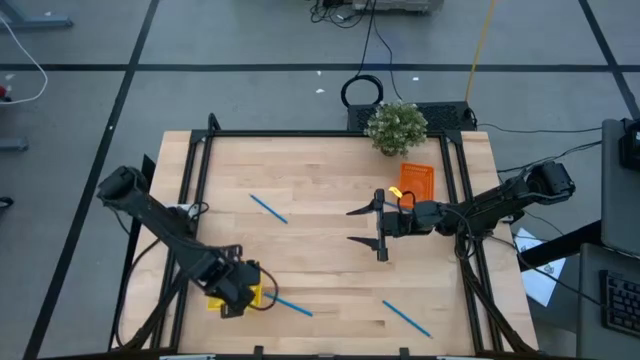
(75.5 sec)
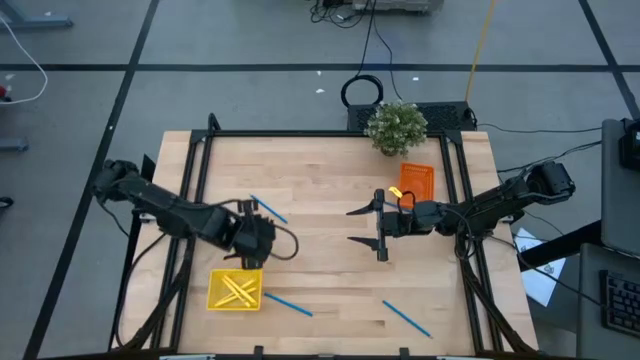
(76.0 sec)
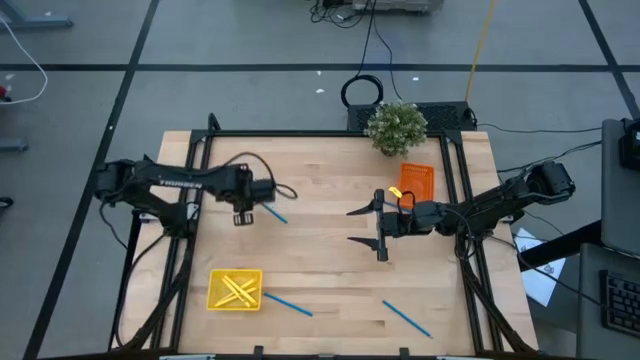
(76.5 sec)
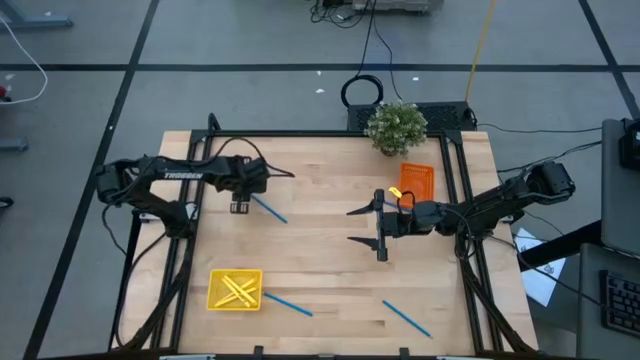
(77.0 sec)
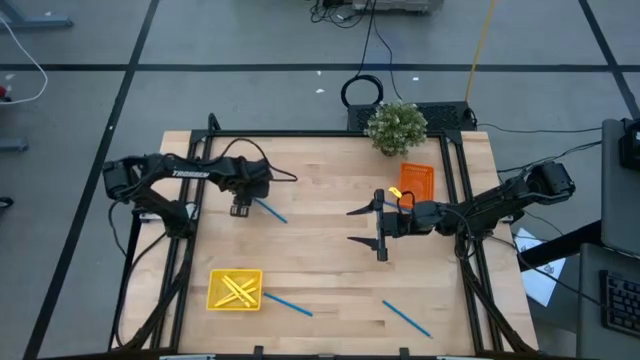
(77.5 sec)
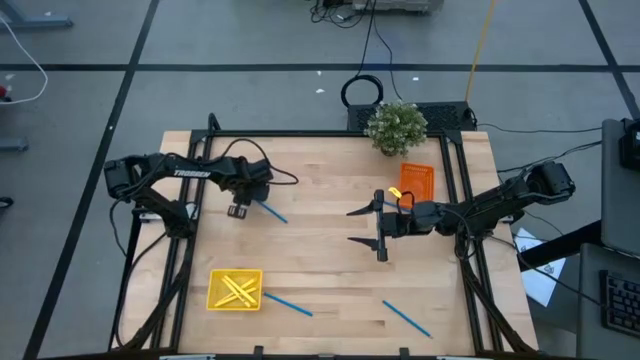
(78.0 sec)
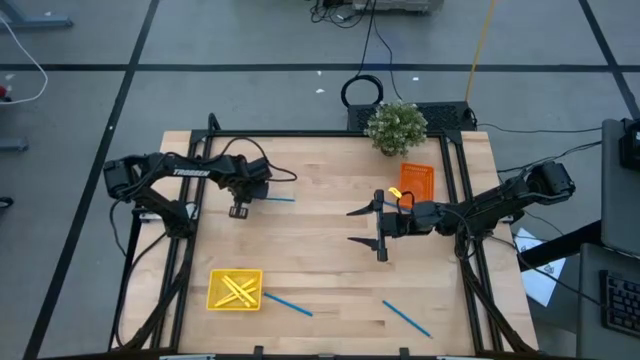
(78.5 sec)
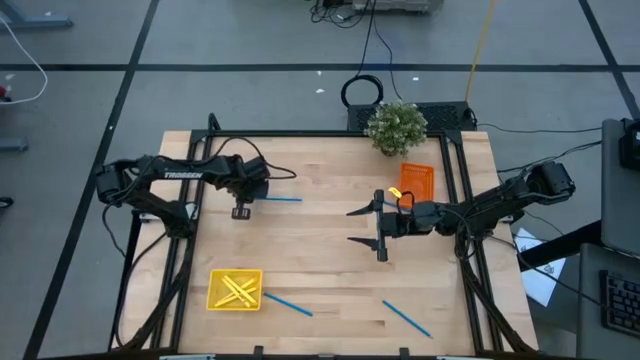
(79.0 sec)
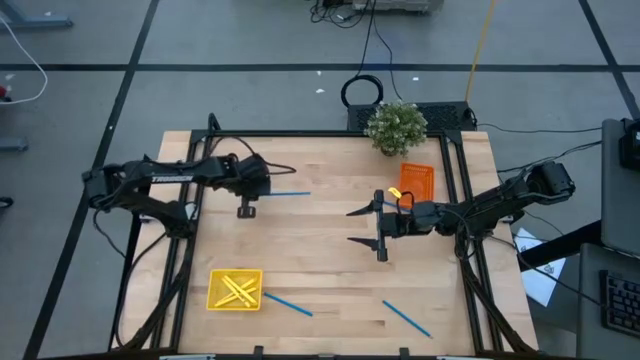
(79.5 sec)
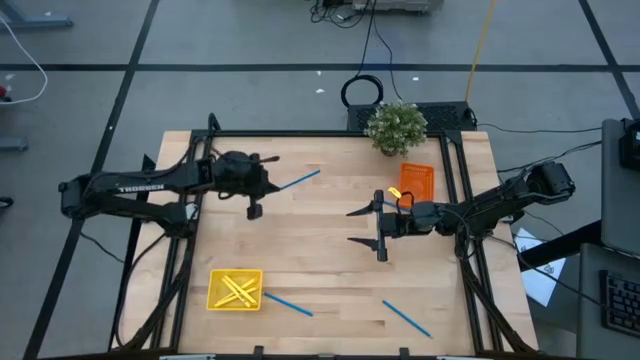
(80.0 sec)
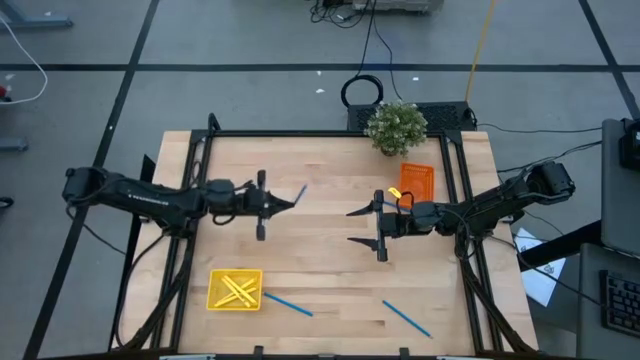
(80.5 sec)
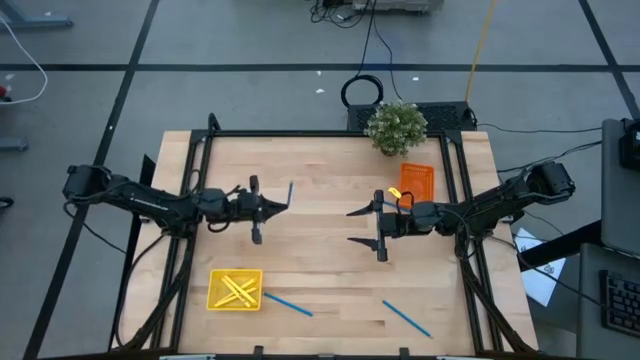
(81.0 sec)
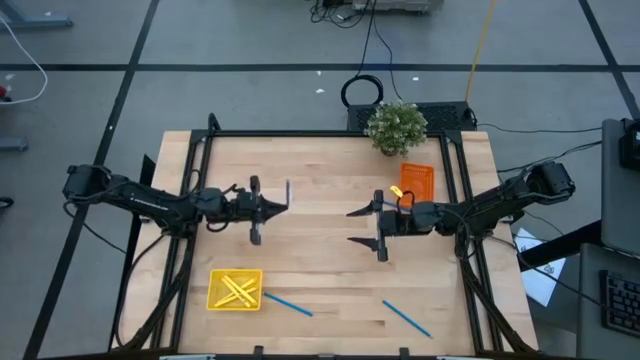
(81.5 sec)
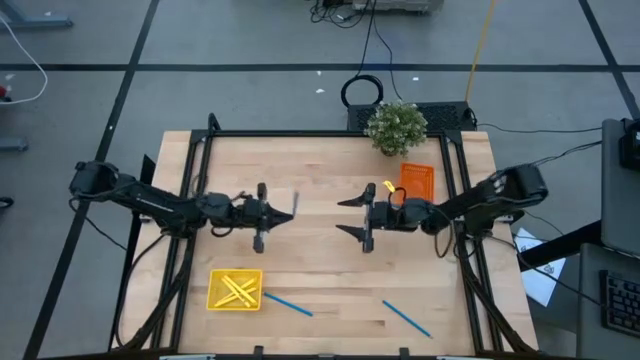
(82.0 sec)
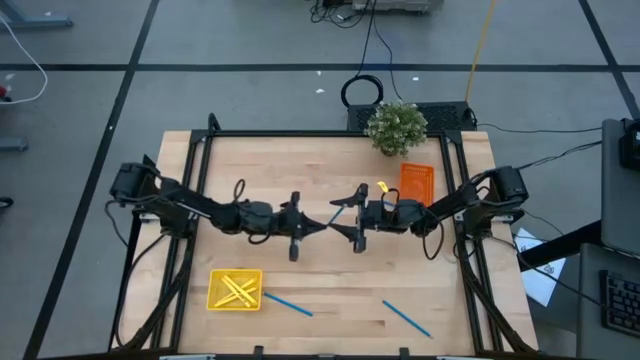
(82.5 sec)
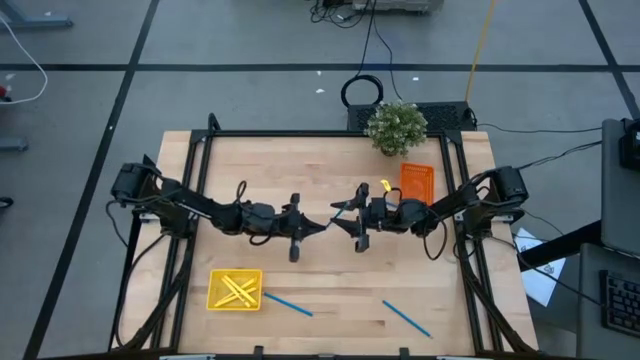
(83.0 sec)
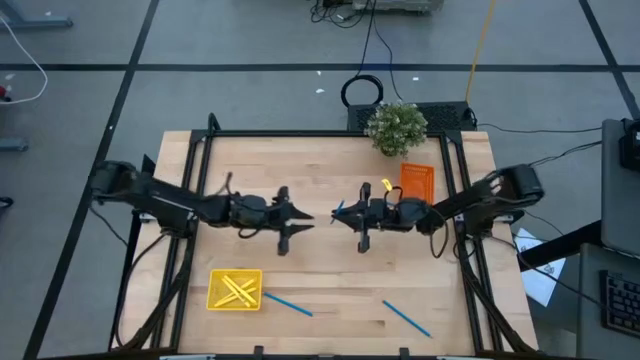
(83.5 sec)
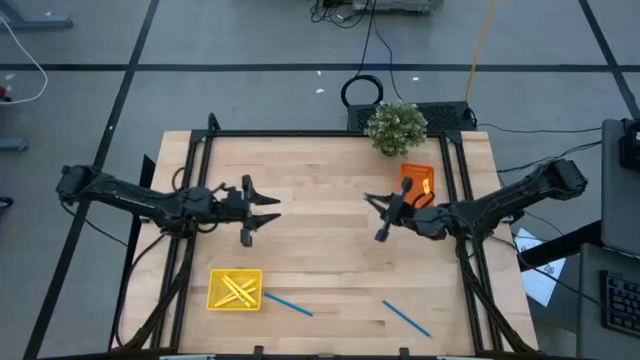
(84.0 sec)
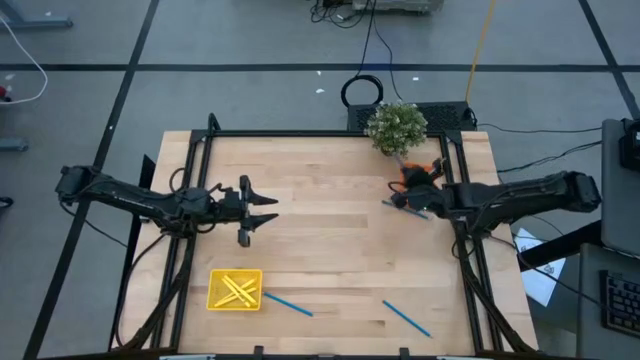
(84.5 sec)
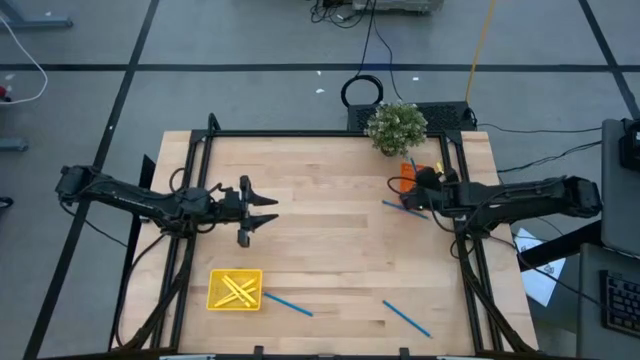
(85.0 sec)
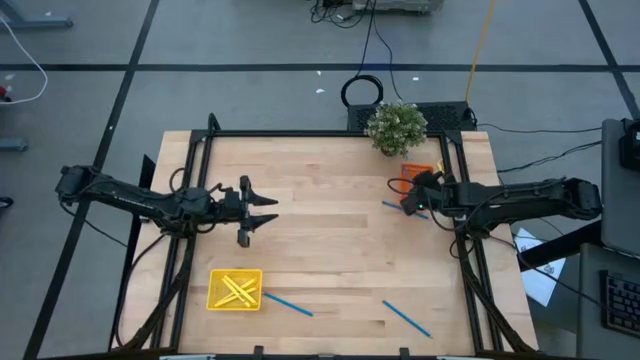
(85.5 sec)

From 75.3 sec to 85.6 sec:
Task: Sort pens & pencils
Put the top left blue pencil into the orange bin

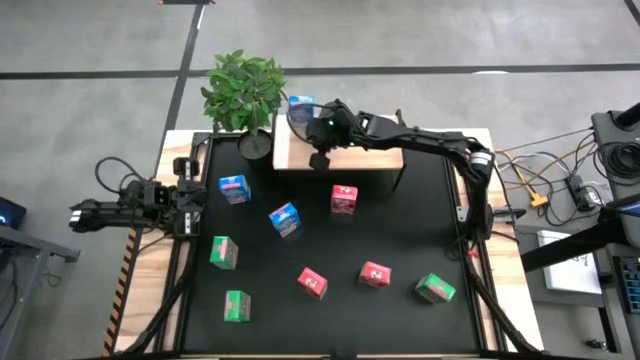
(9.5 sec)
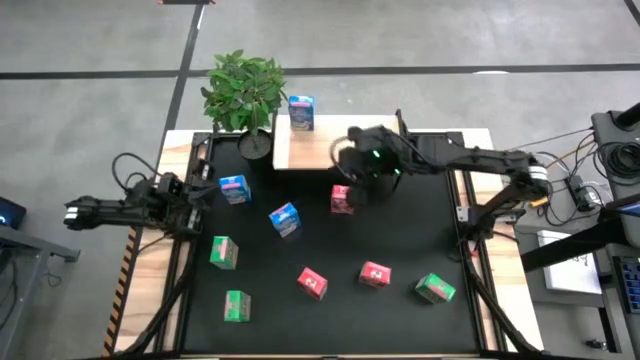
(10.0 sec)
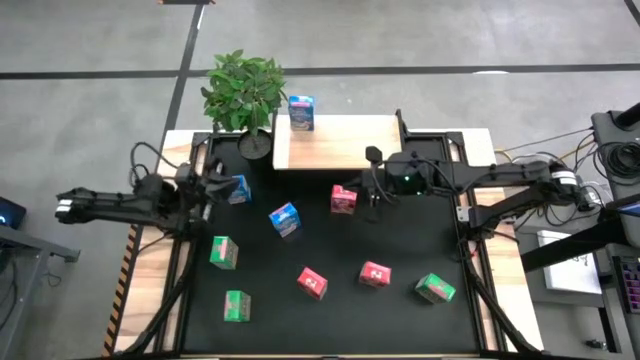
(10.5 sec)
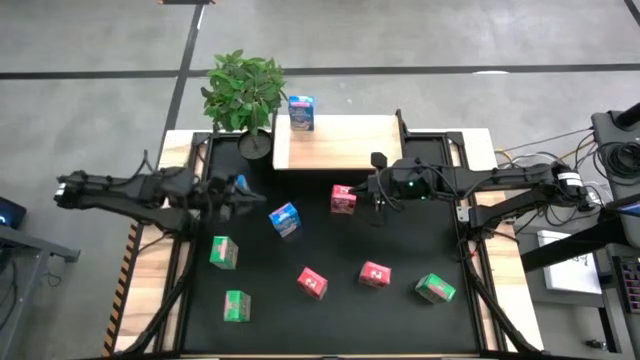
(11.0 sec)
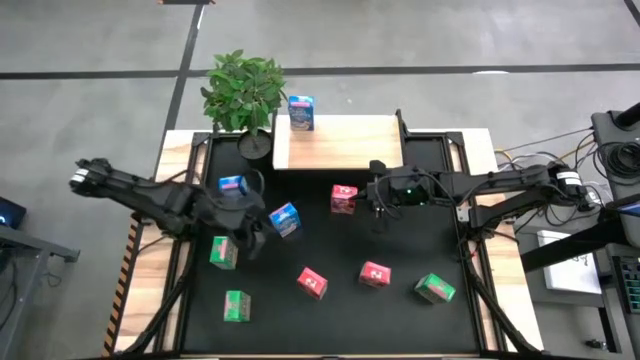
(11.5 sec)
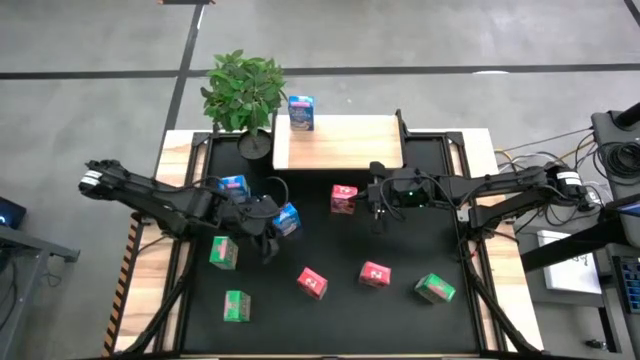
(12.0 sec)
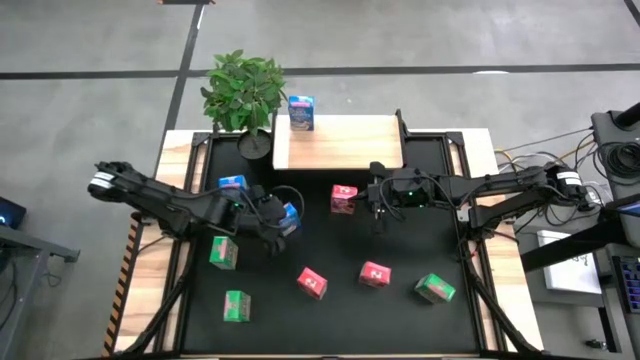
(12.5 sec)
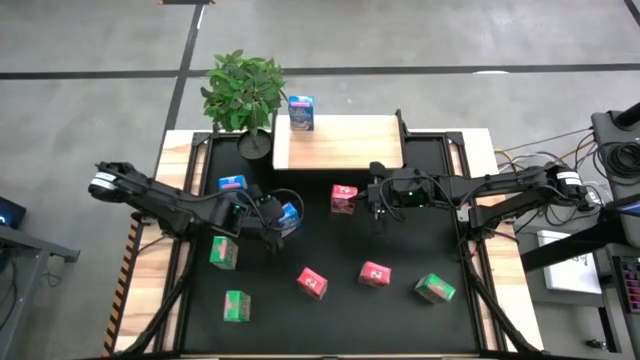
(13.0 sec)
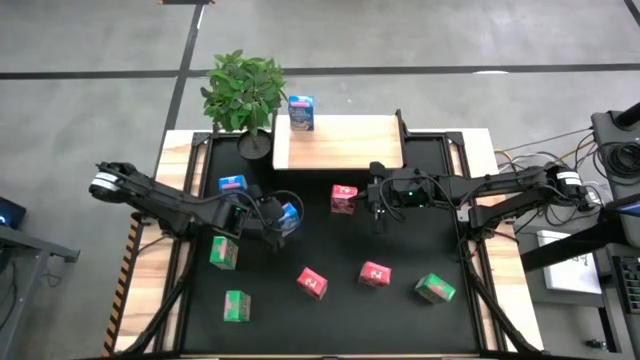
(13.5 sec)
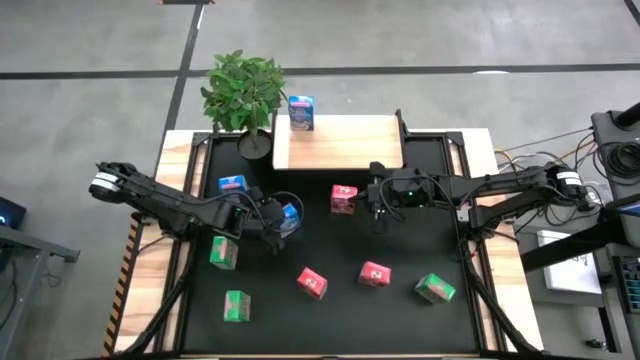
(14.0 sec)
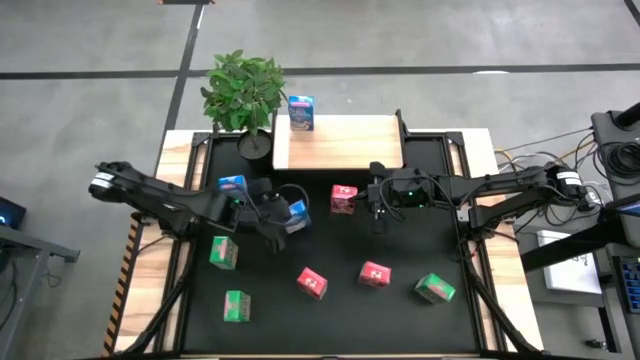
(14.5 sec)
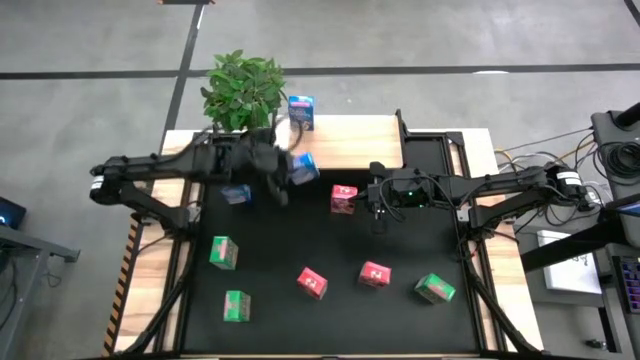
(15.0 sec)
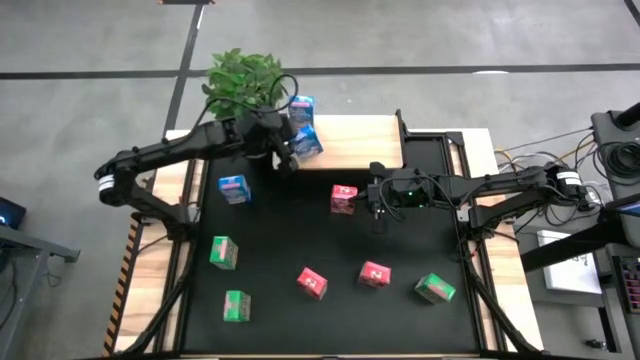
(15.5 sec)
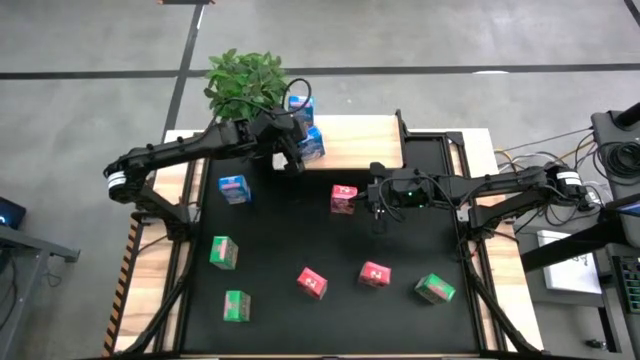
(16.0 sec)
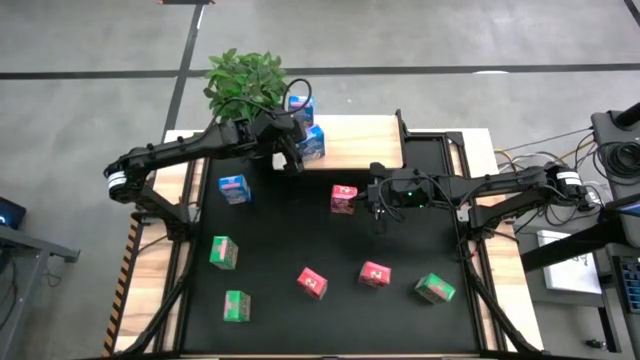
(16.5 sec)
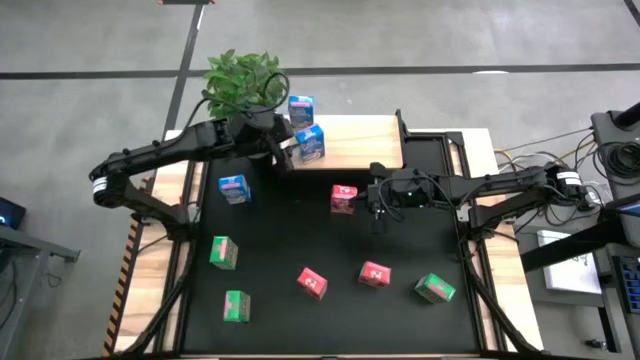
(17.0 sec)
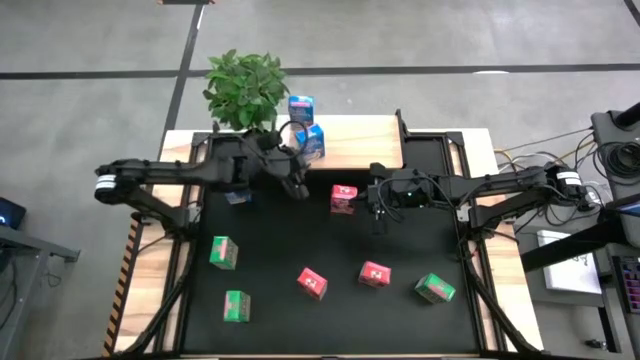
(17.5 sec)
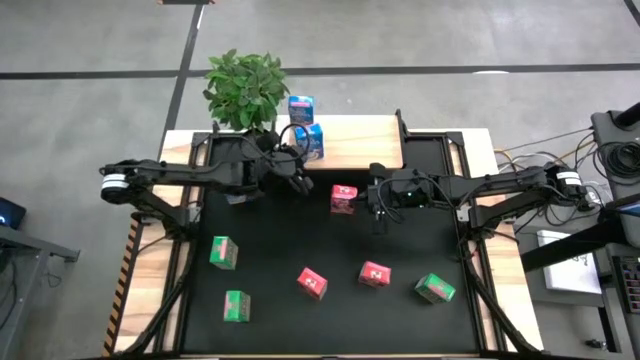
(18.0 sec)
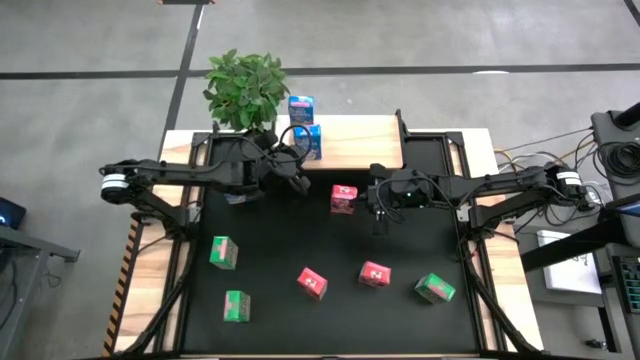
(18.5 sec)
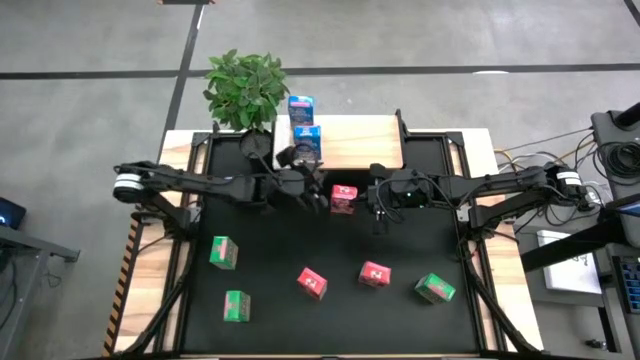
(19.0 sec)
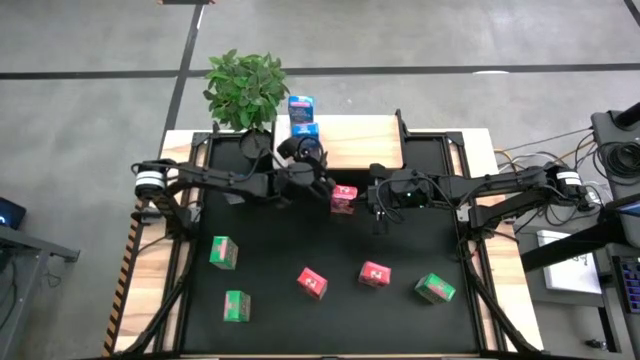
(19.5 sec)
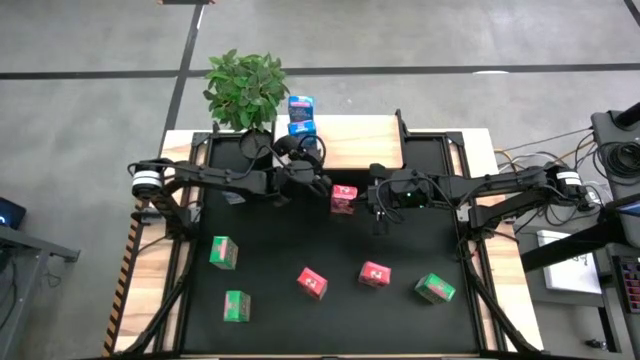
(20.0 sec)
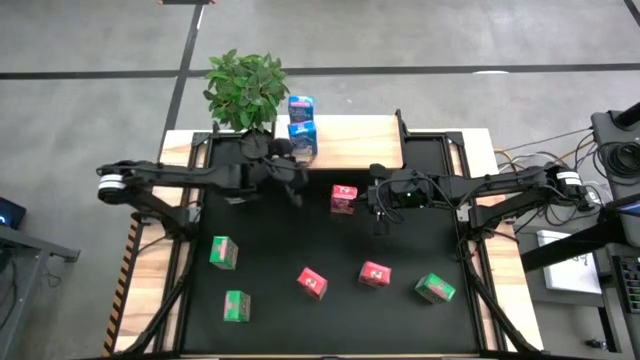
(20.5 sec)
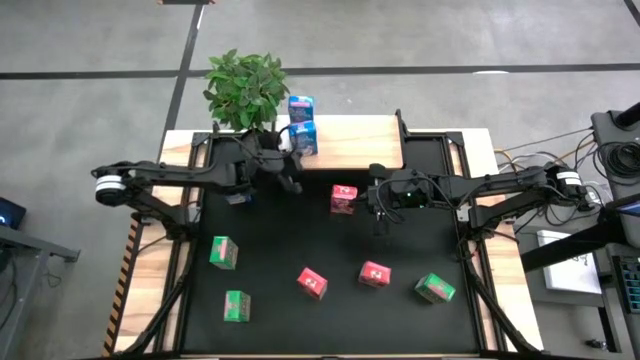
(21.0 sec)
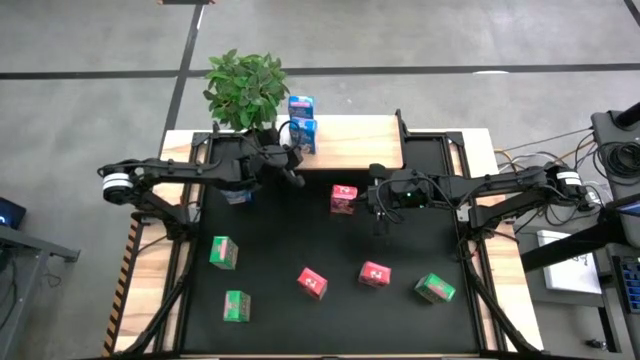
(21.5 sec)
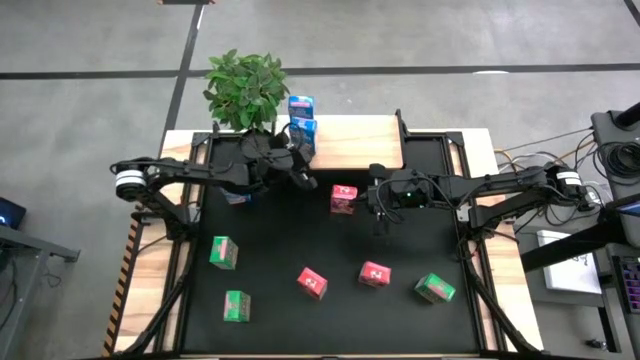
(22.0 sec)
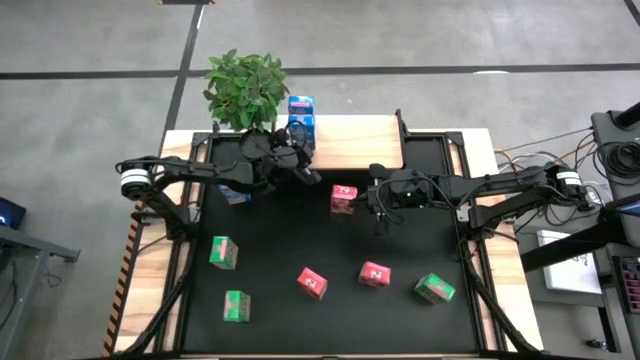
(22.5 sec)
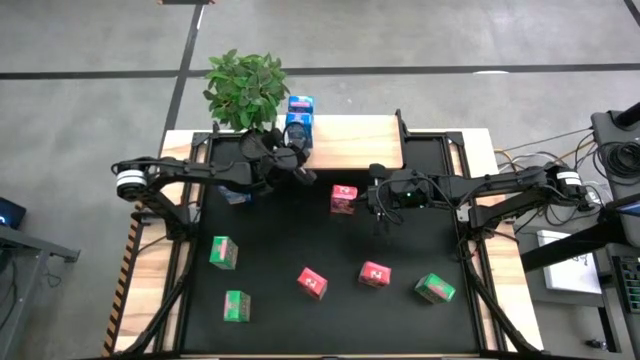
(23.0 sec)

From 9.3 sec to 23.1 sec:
Task: Stack cereal on shelf
Put the bottom blue cereal box aligned with the other blue cereal box on the shelf
